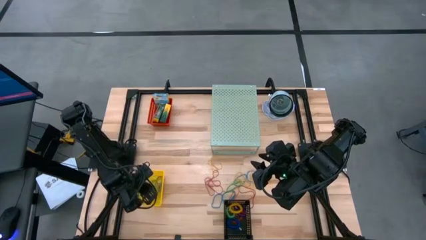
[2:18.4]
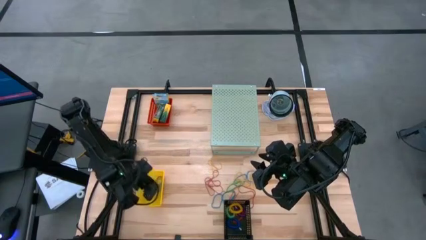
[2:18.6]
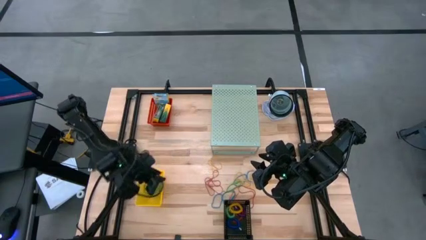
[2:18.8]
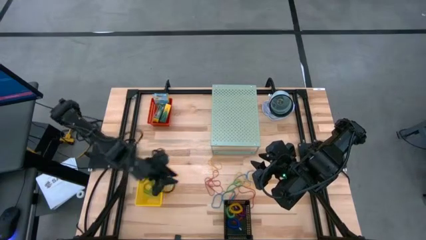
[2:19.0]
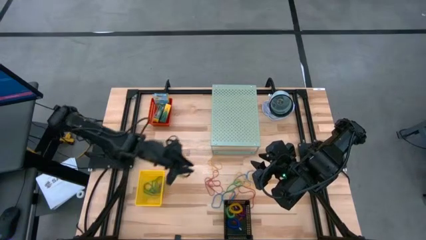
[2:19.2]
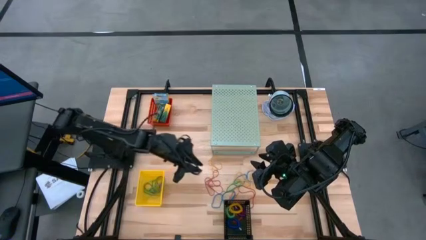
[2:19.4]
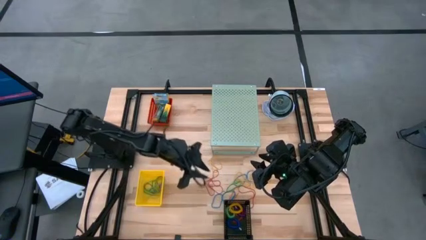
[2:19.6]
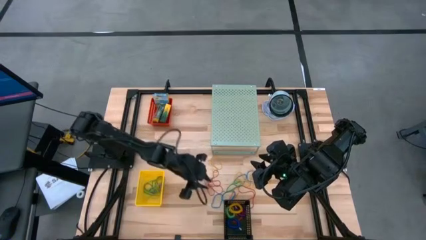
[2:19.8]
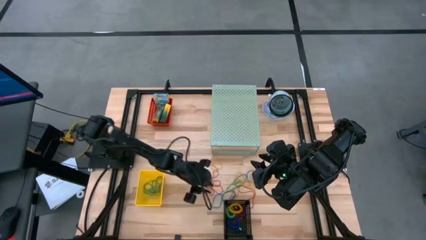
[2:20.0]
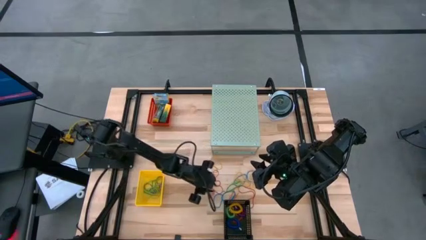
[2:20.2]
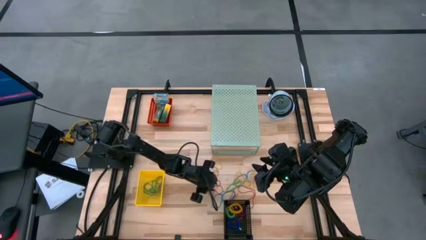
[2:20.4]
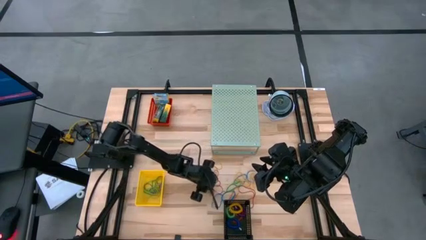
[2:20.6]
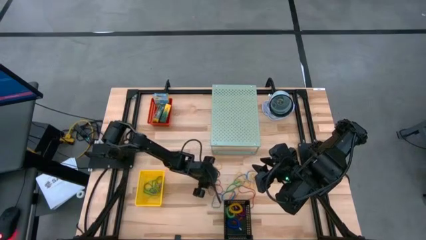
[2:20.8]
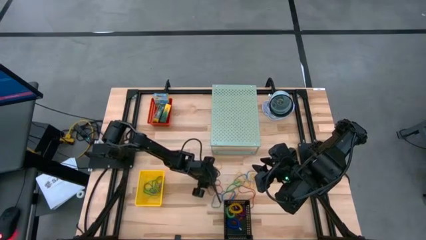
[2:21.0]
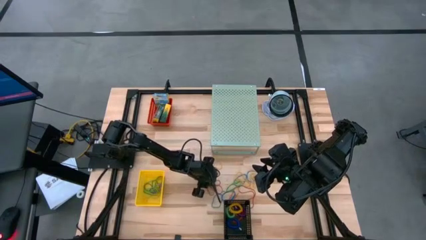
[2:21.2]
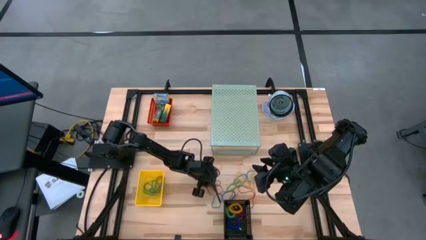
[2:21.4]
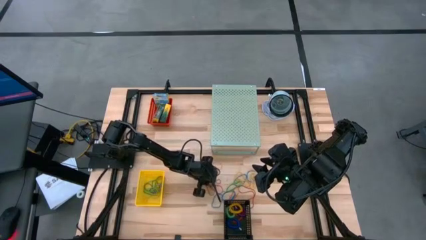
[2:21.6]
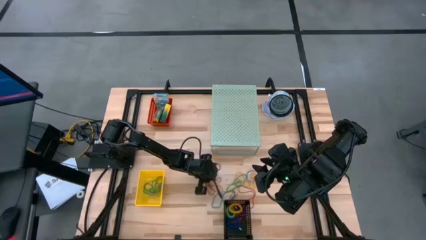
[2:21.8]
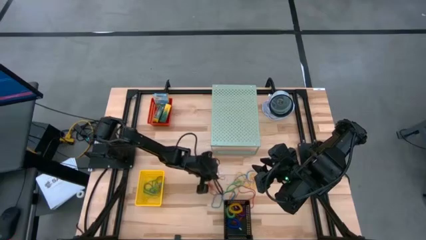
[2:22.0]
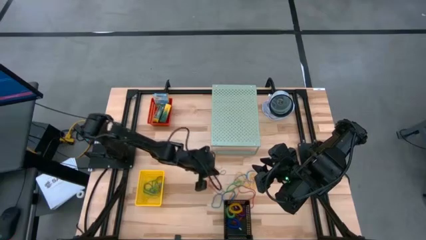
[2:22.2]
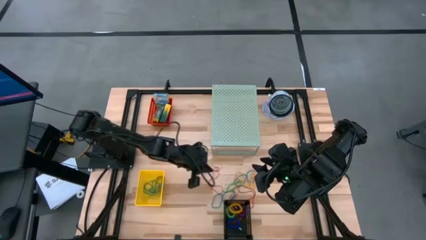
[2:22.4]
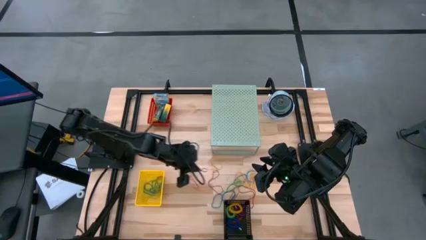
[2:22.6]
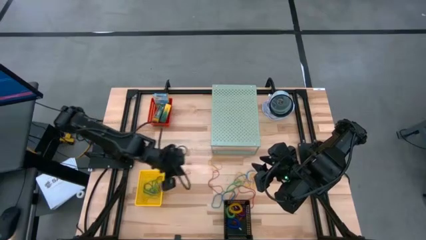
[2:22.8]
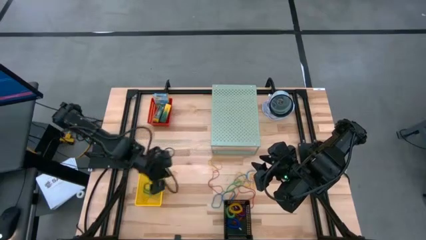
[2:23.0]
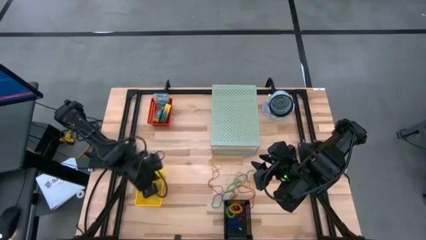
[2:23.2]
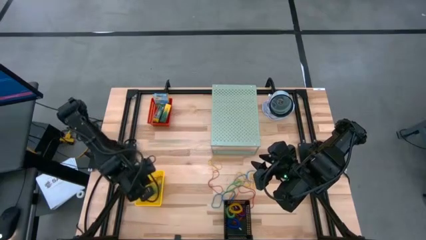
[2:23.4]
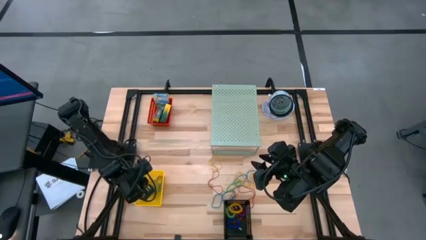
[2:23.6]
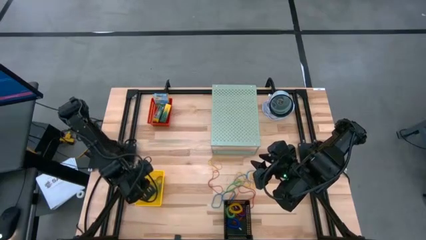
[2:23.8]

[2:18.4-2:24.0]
Task: Pick & Place Office Desk Supplies
Put the red rubber band into the yellow bin

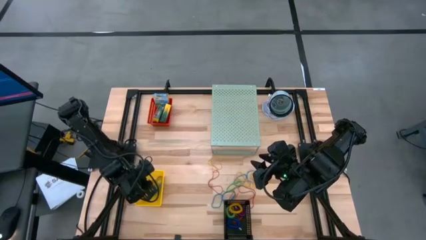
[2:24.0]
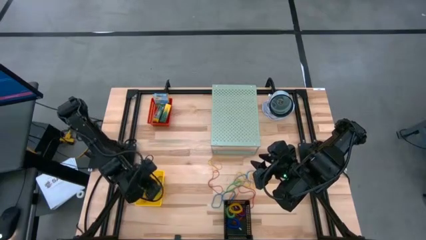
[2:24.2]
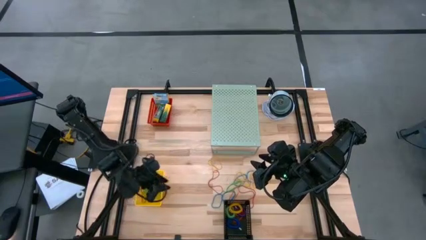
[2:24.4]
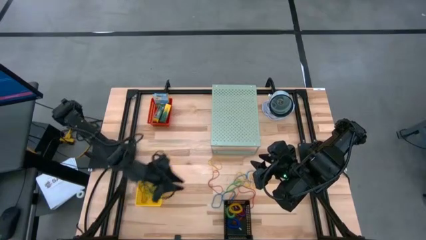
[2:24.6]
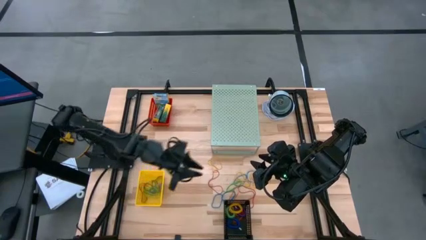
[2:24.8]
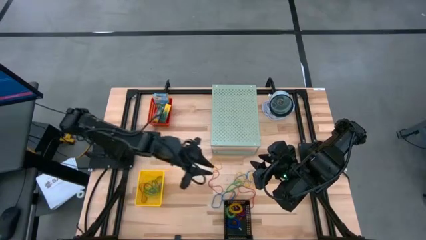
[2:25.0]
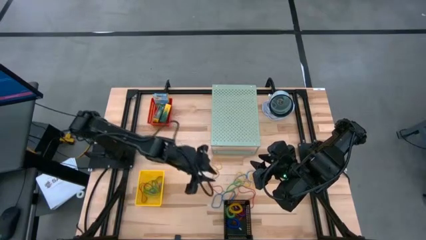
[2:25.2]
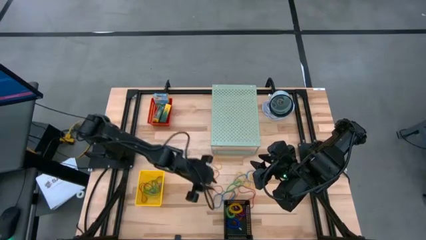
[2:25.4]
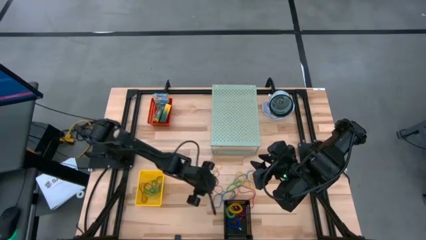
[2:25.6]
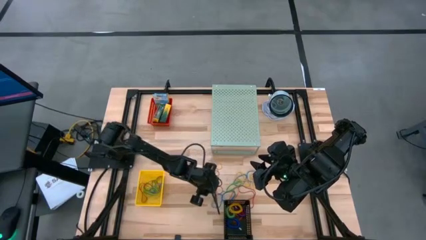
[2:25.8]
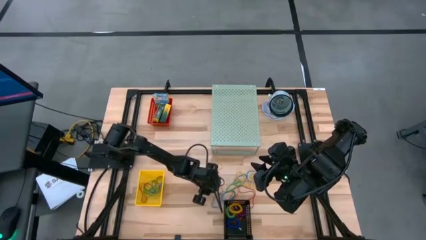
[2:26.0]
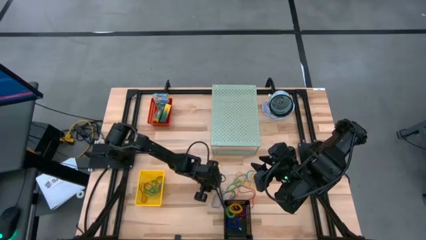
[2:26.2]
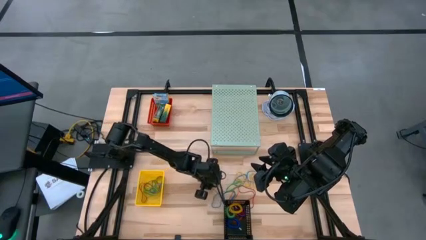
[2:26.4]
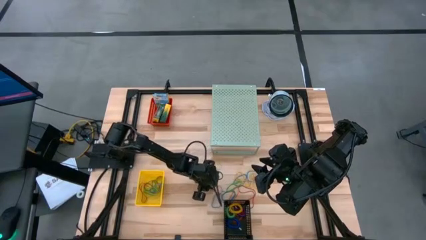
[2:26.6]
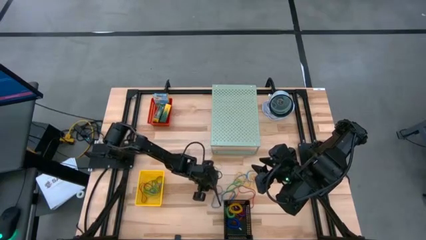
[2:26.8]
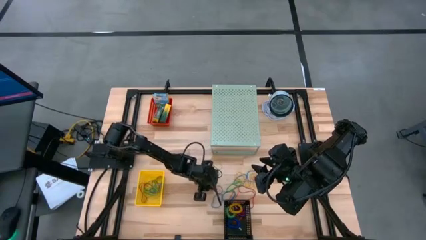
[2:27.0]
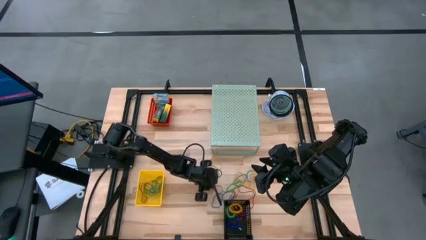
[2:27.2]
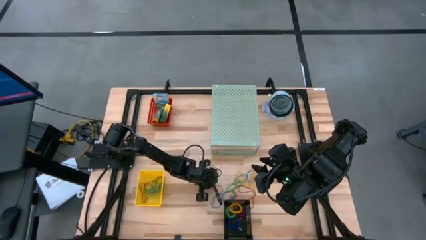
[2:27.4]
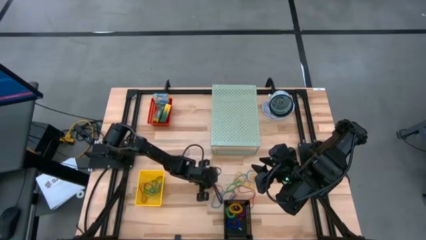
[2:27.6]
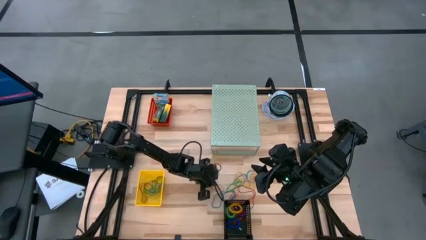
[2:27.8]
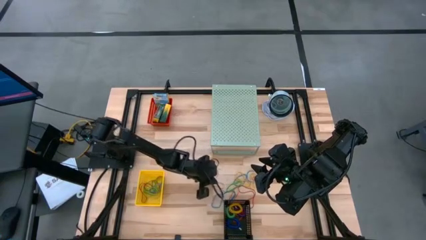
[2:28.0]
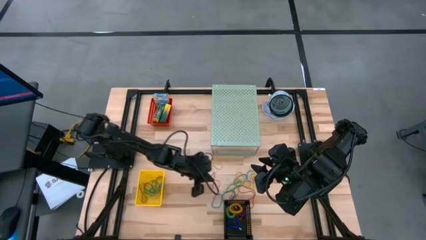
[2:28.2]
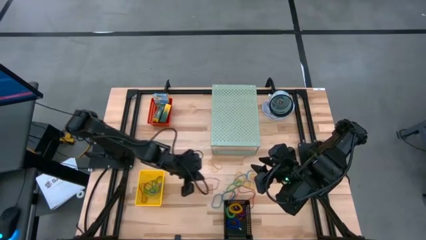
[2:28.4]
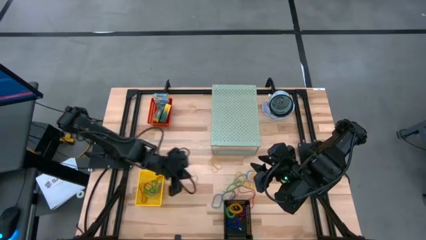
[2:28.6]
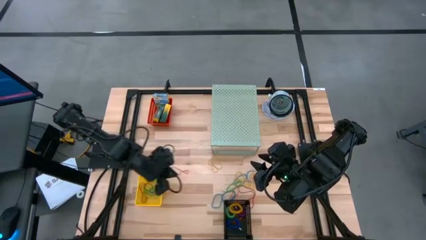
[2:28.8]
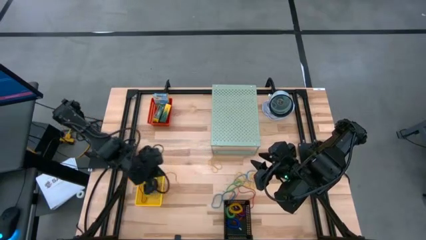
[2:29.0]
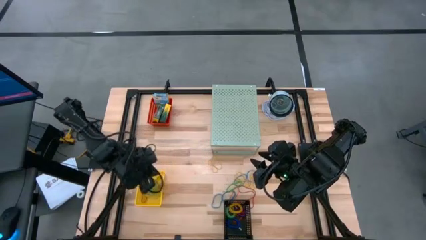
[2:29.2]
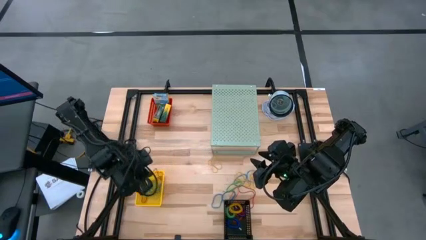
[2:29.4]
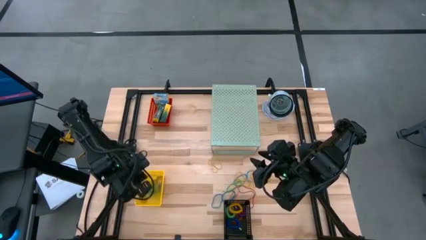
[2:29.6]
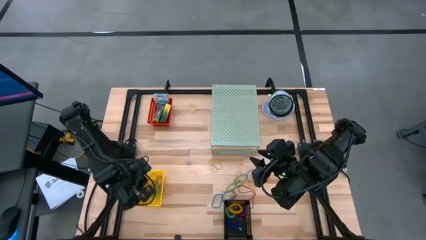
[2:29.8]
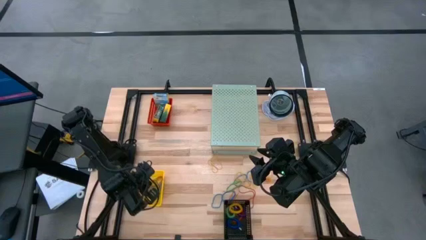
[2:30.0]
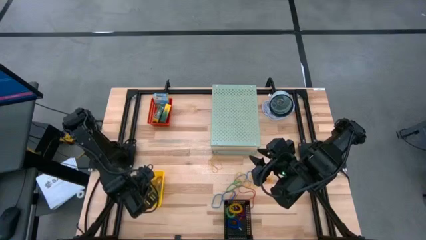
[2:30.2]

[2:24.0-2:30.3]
Put the red rubber band into the yellow bin

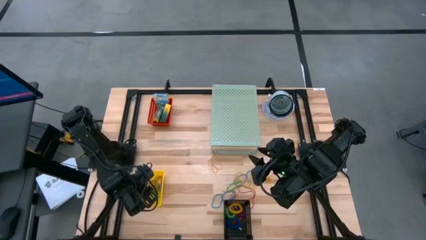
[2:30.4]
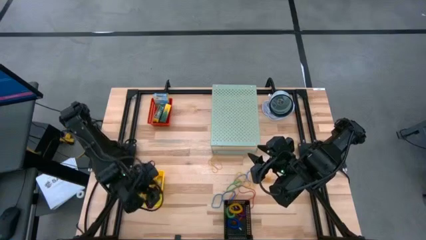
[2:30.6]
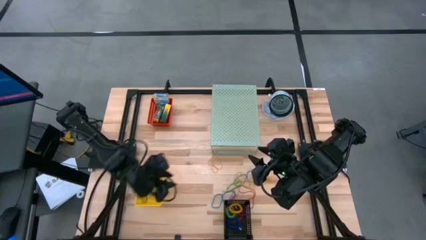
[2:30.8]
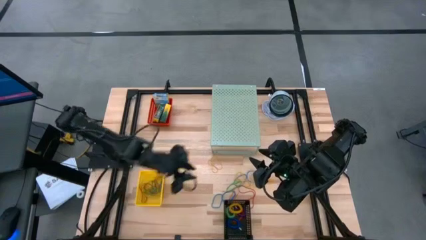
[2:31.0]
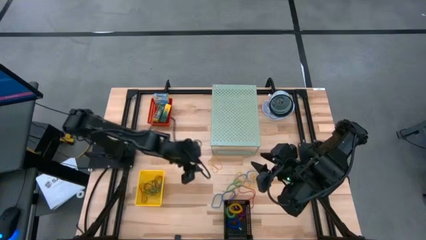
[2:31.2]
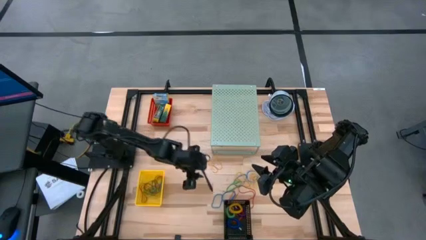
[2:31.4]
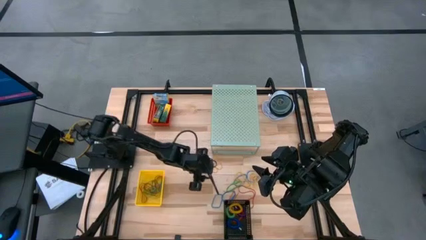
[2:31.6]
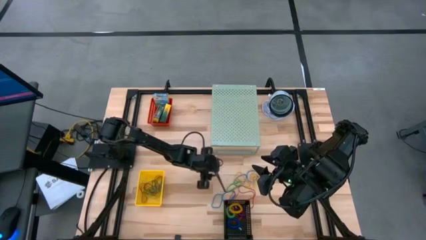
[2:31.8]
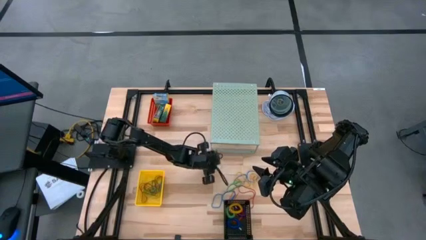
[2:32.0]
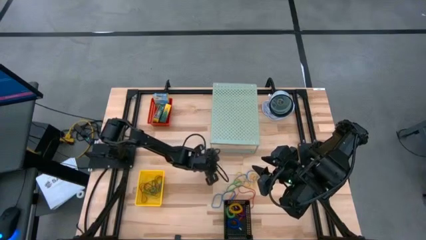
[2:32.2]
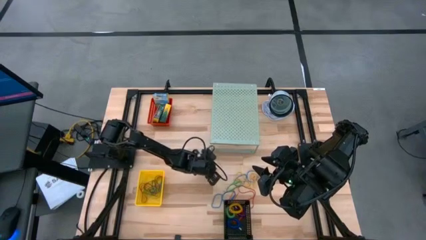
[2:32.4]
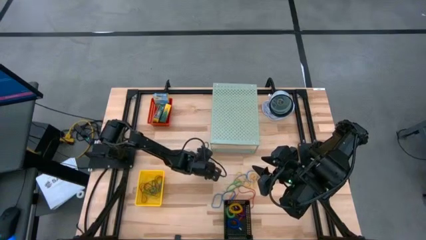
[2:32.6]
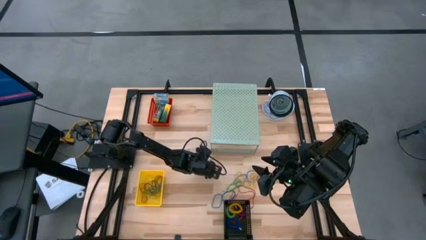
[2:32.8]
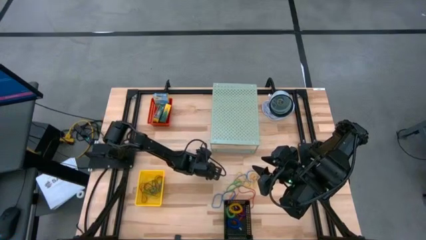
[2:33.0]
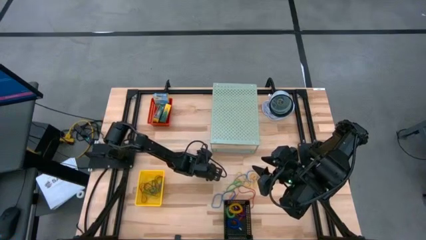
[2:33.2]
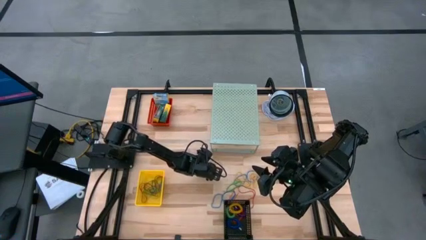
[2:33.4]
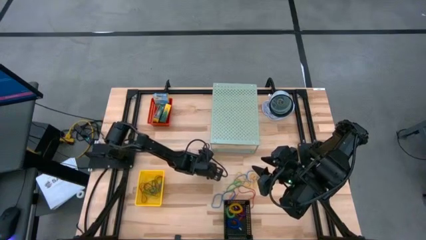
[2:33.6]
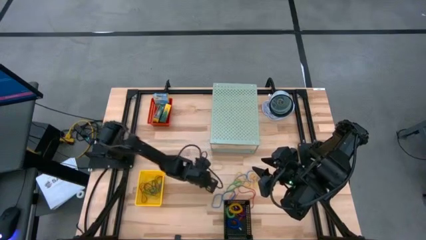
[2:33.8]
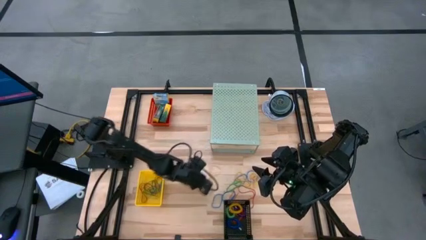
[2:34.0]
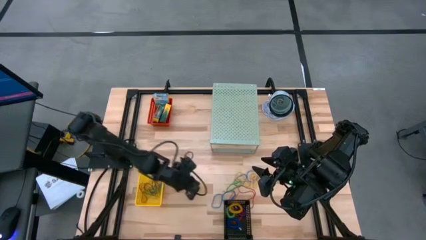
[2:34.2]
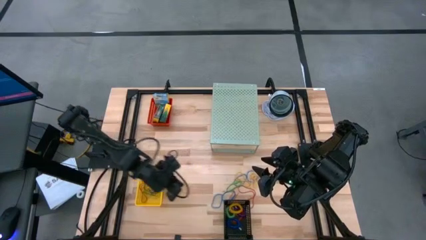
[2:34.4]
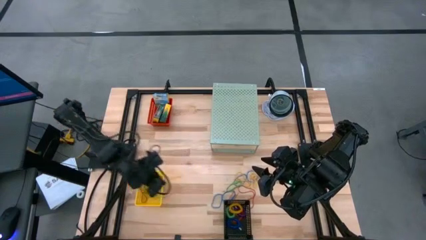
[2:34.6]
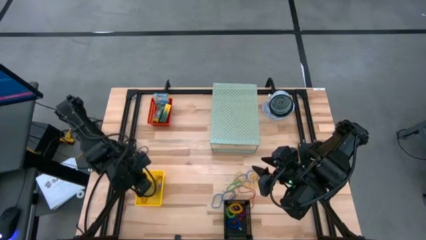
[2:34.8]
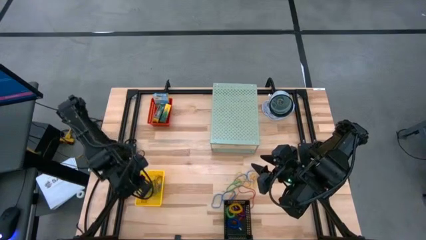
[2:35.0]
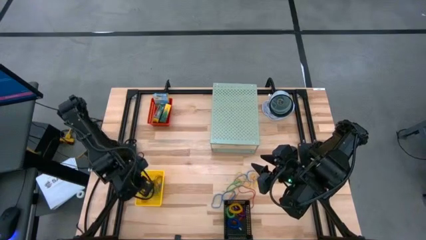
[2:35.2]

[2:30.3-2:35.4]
Put the yellow rubber band into the yellow bin
